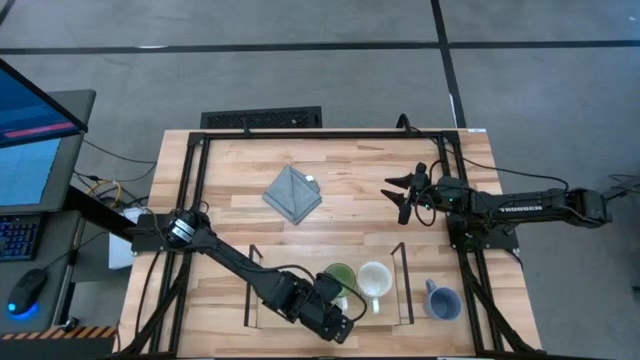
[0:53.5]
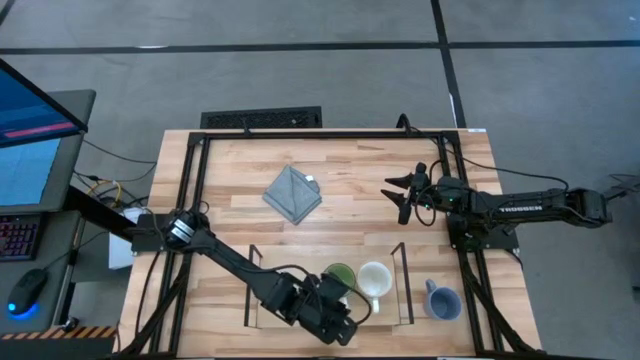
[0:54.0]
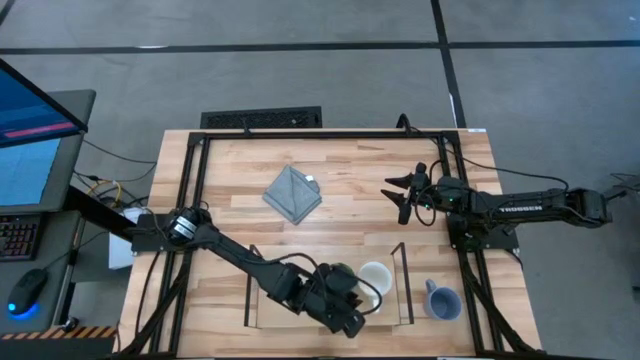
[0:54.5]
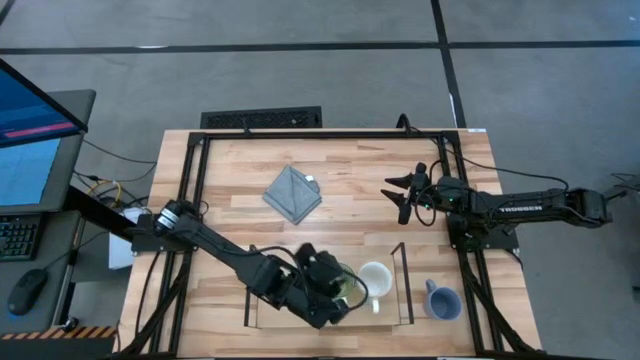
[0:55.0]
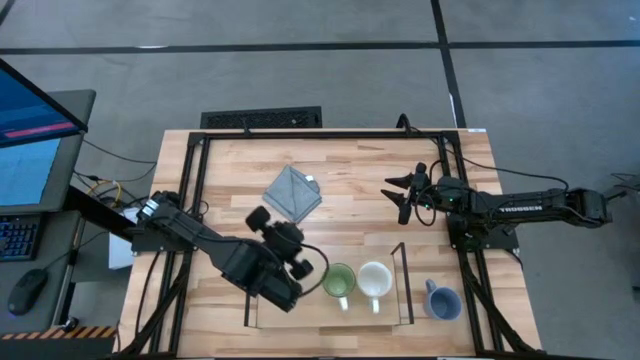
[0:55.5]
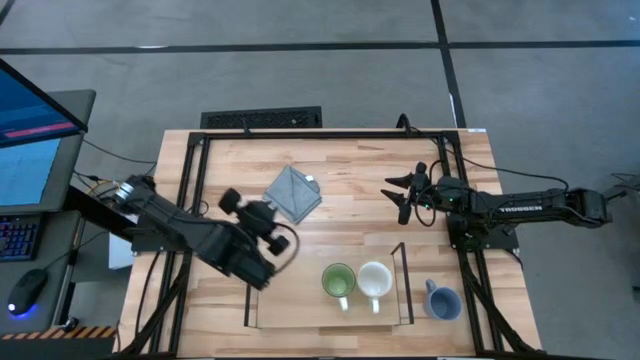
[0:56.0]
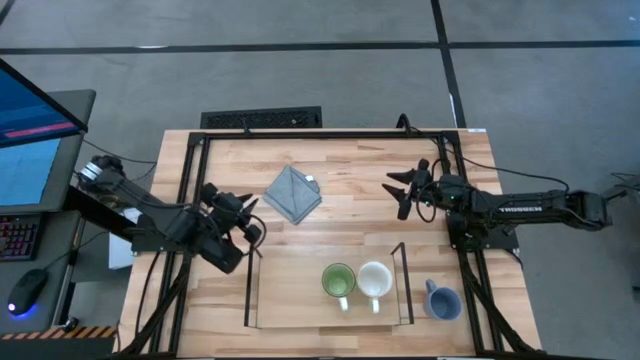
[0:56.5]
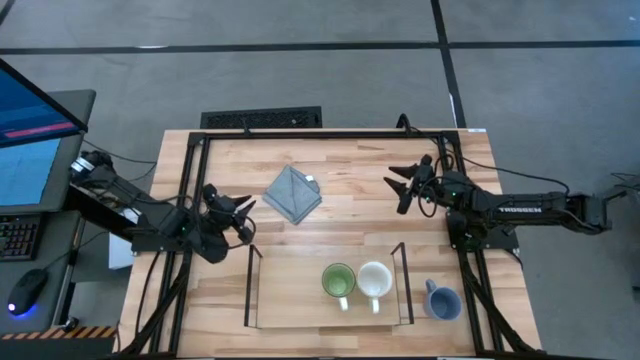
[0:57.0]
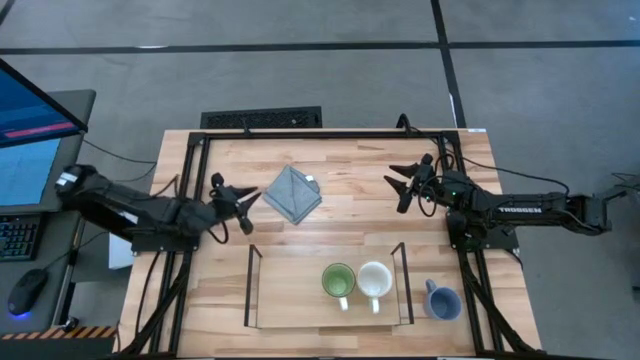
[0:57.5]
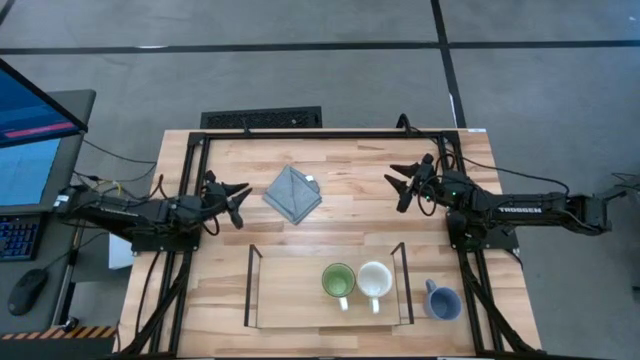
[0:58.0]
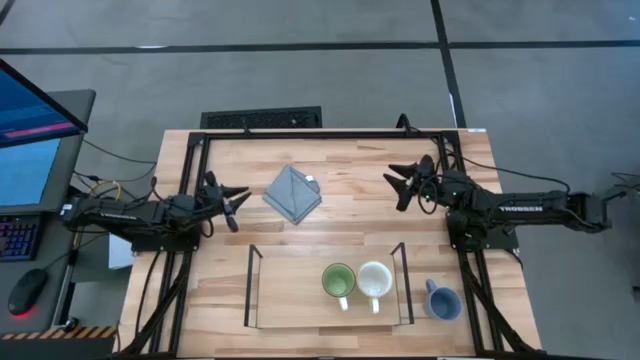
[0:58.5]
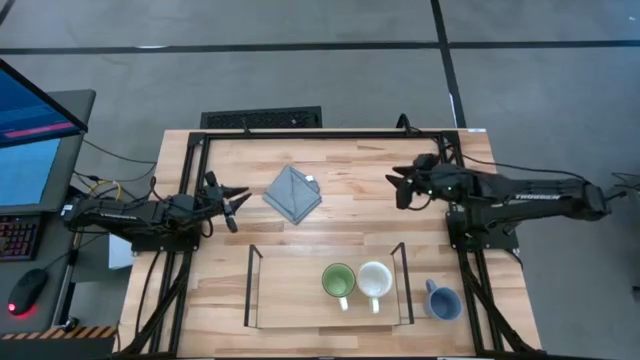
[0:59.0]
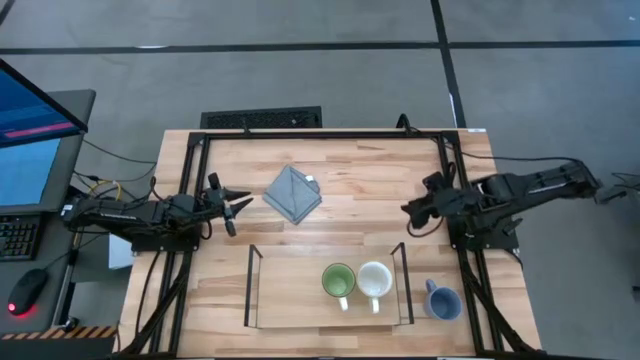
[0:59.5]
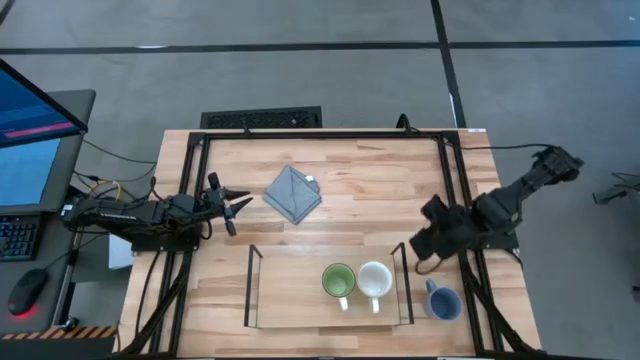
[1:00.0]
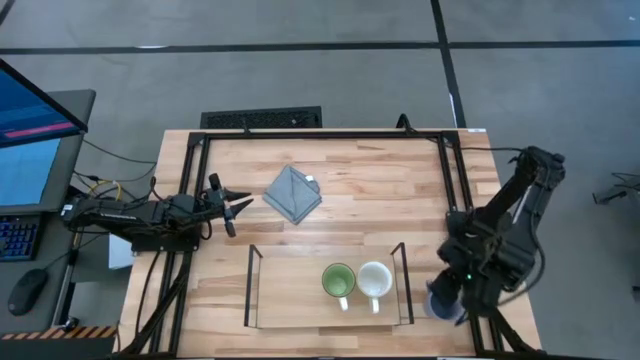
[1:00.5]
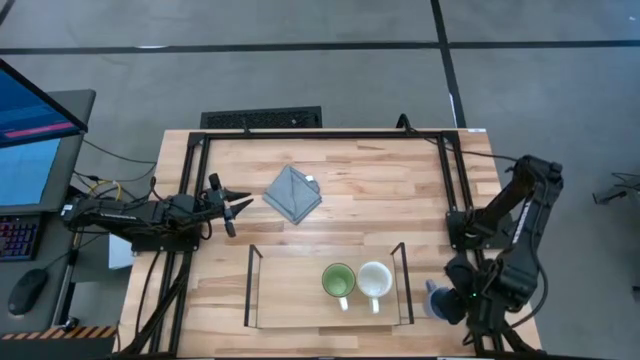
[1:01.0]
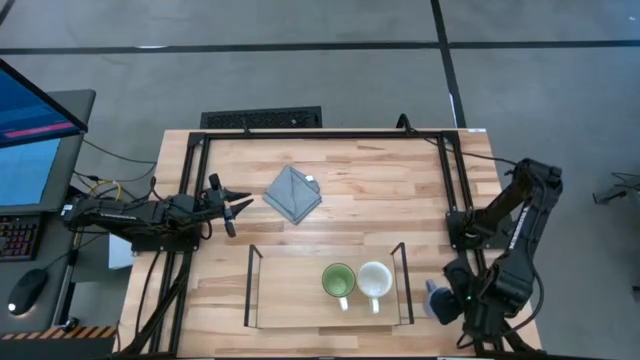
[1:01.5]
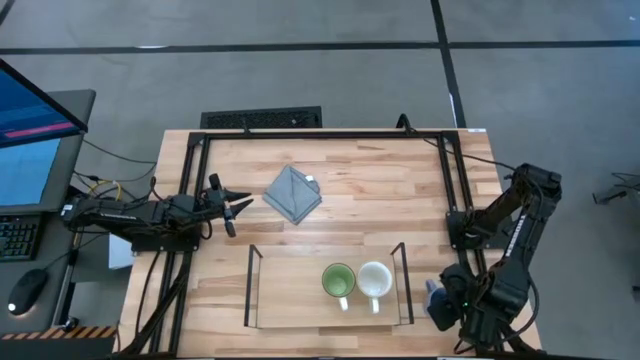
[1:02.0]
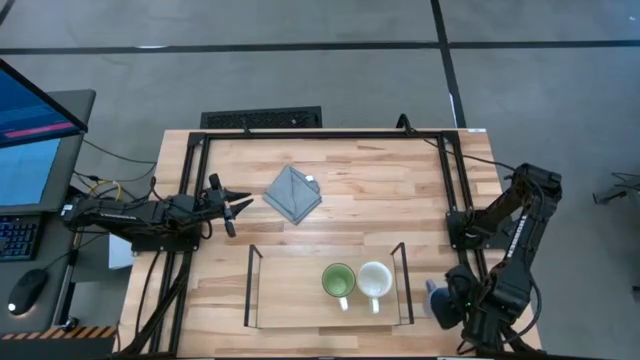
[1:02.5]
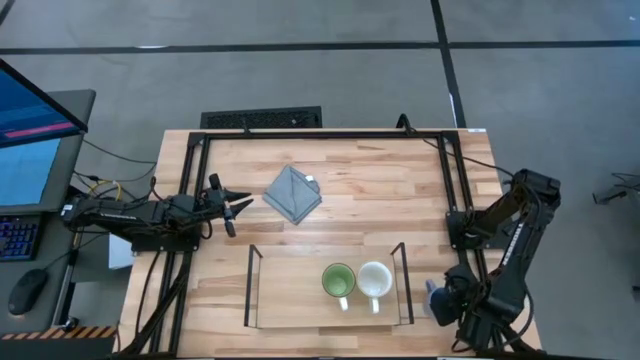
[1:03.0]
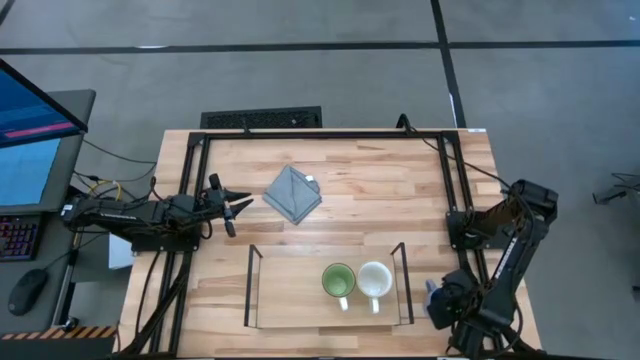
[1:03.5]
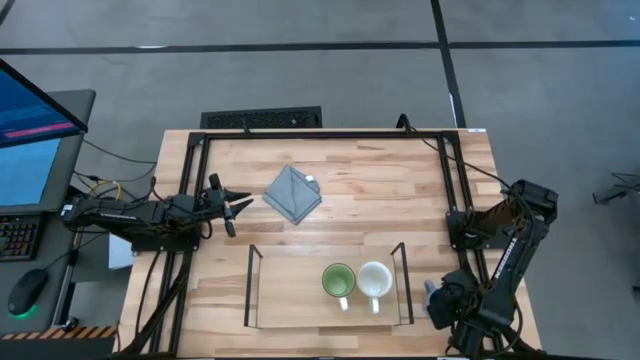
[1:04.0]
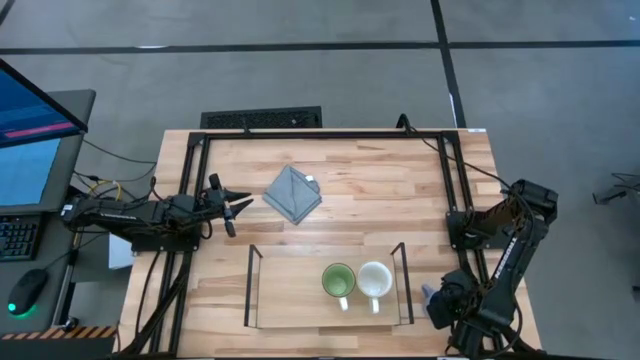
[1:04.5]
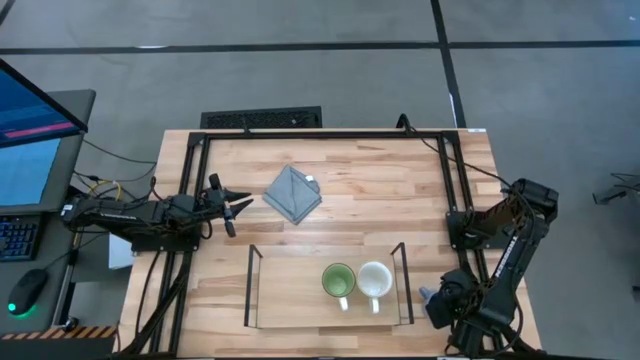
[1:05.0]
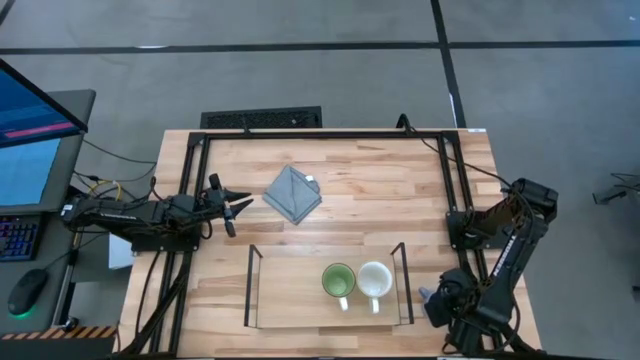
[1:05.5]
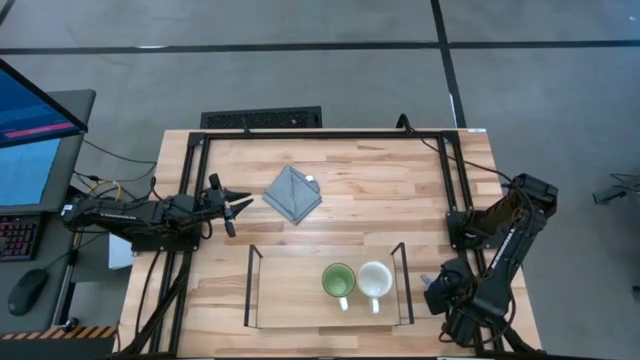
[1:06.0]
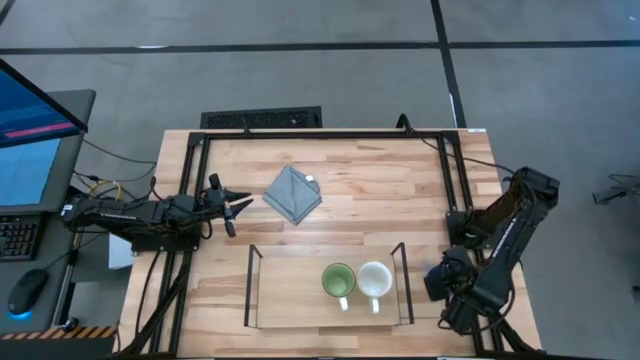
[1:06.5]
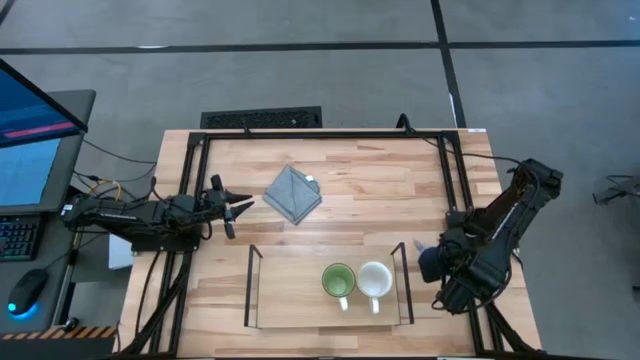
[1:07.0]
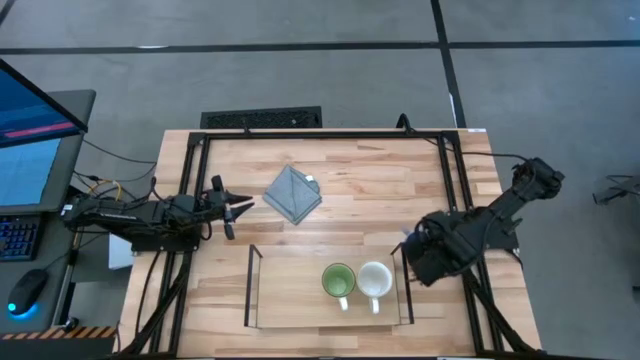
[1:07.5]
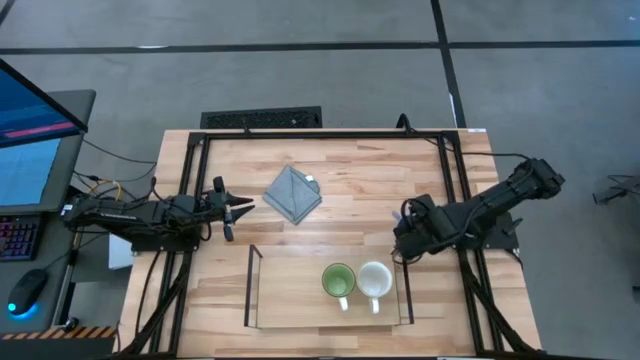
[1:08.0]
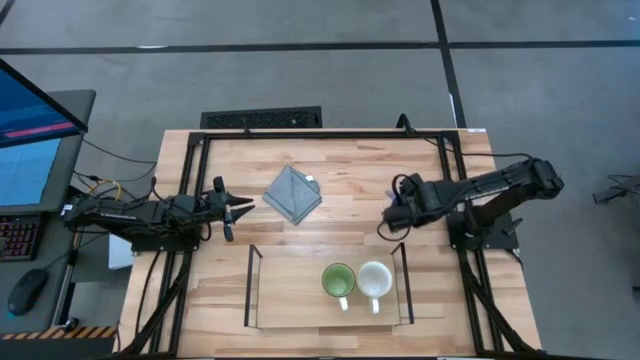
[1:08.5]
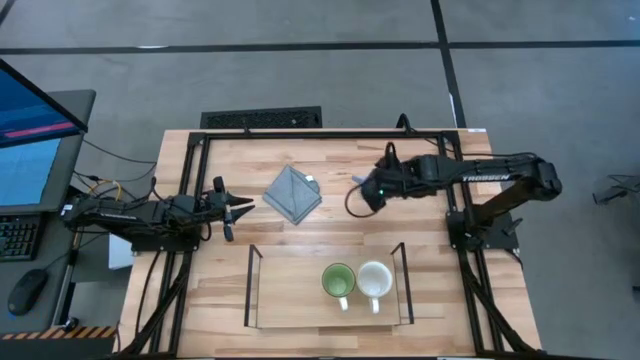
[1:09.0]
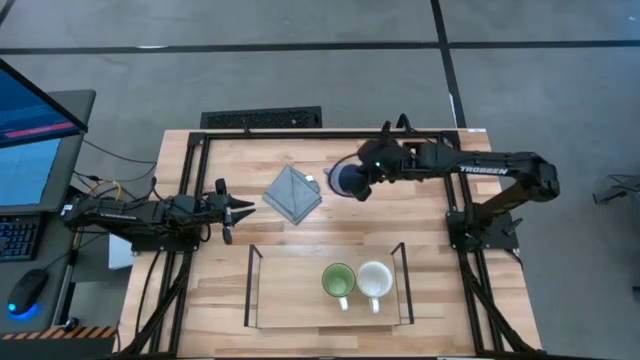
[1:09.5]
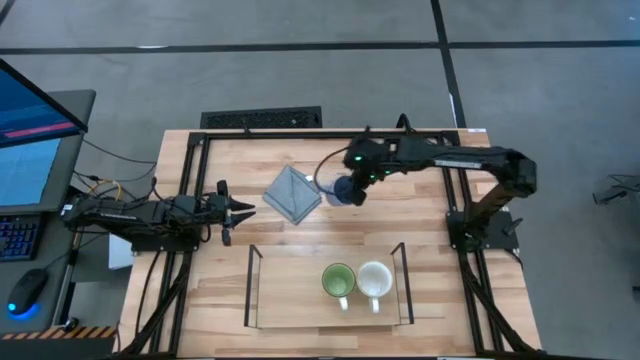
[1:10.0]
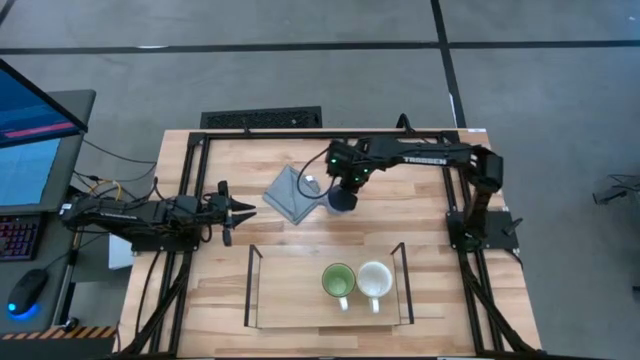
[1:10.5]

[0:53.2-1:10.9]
Task: Stack small to large cups/mugs on shelf
Put the blue mug on the shelf

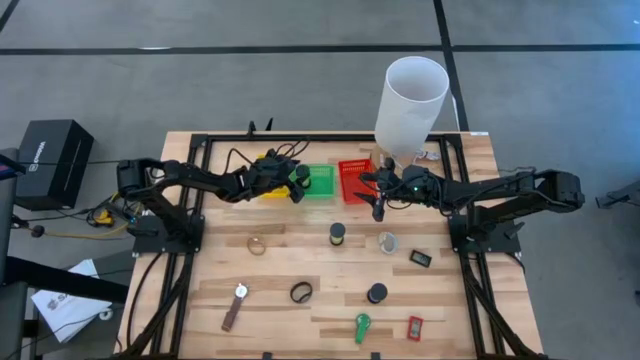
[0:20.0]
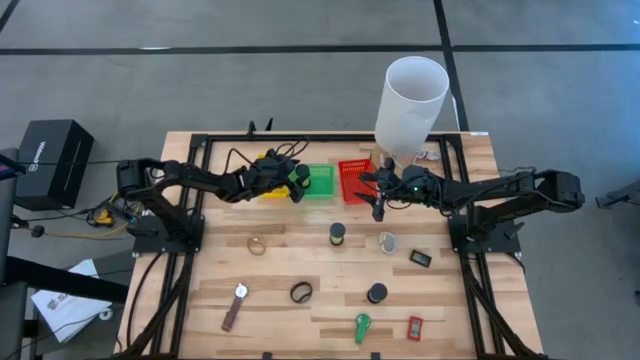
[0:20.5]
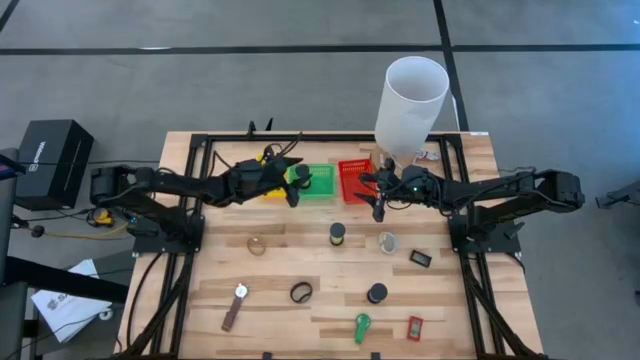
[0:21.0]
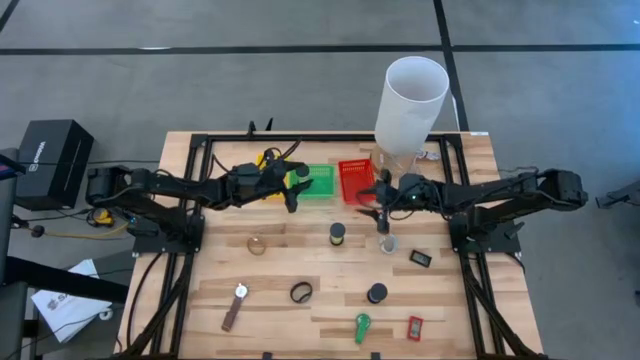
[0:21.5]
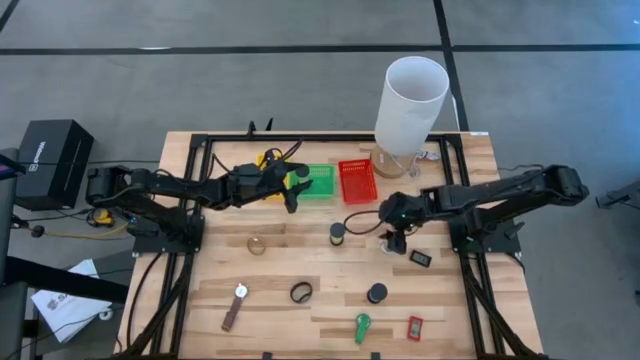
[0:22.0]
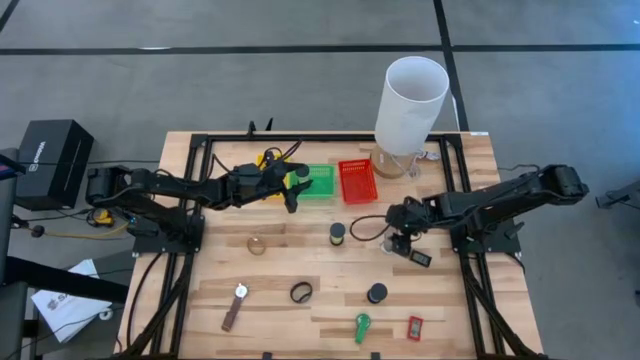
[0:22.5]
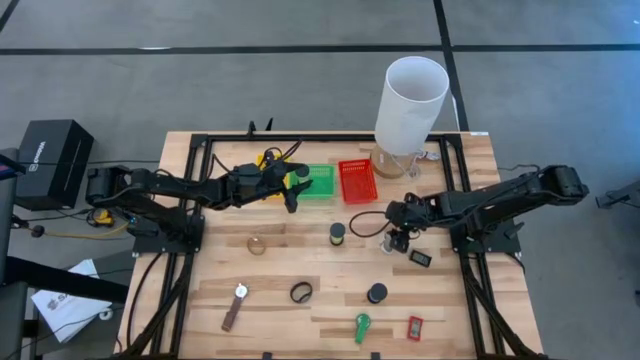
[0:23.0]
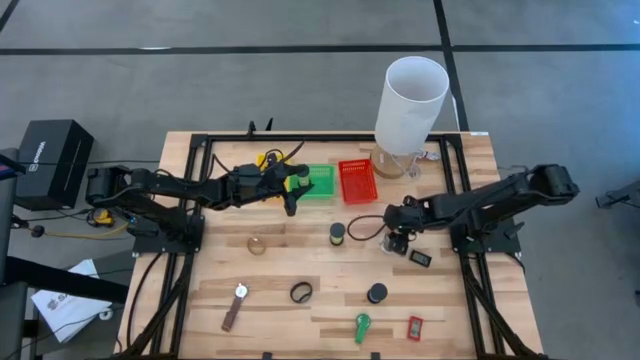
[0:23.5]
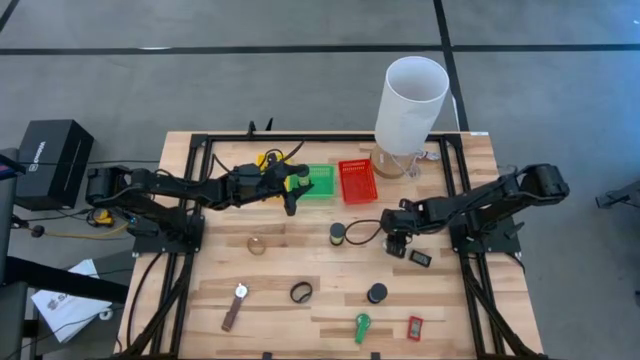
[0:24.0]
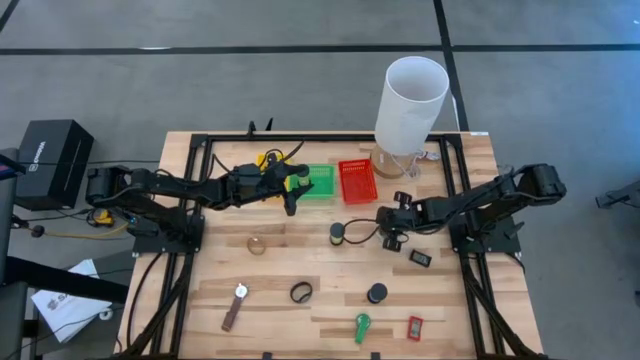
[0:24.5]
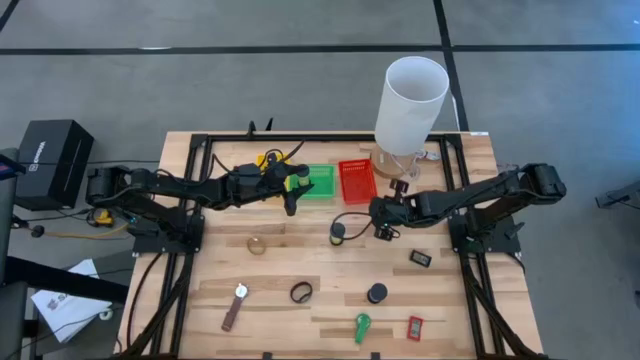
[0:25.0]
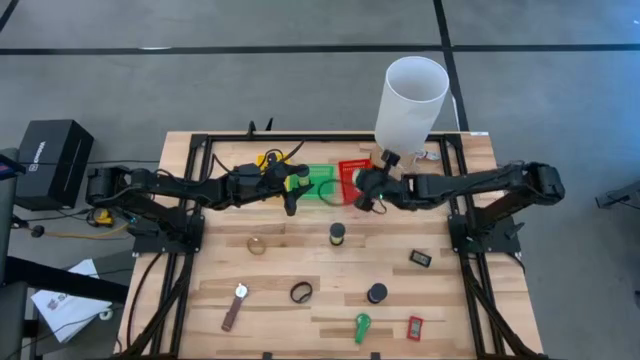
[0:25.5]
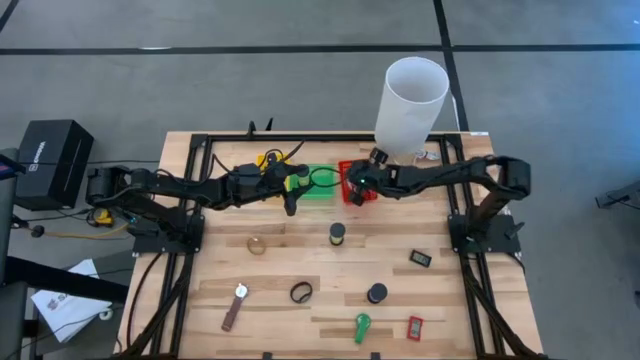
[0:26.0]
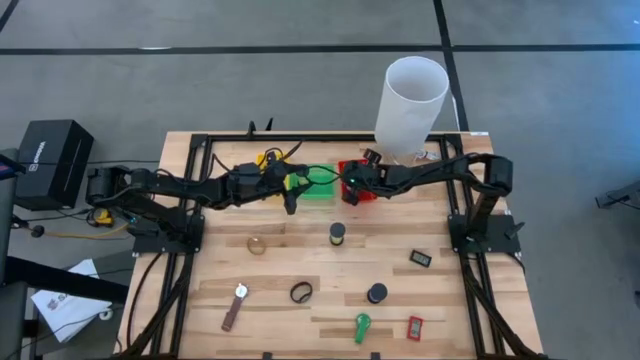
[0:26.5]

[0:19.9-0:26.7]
Task: Pick & Place Office items
Put the white wrist watch into the red basket
